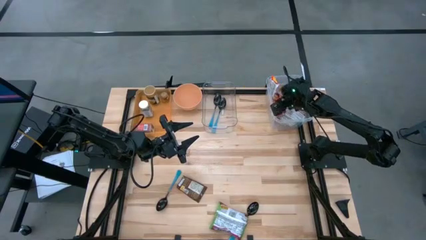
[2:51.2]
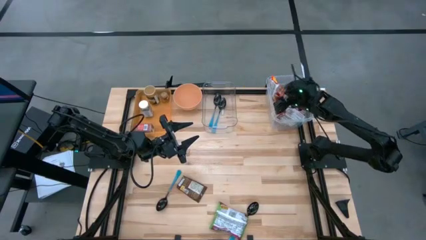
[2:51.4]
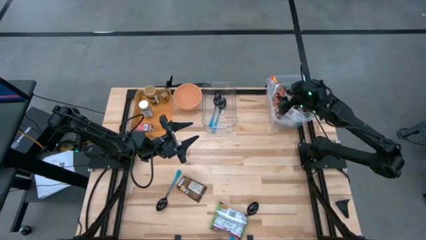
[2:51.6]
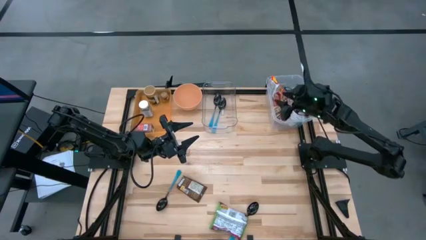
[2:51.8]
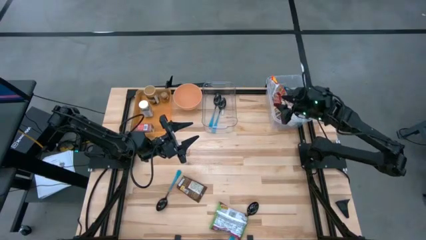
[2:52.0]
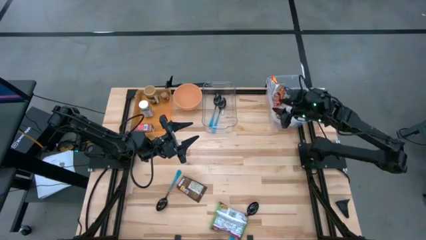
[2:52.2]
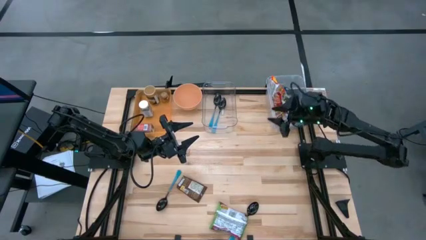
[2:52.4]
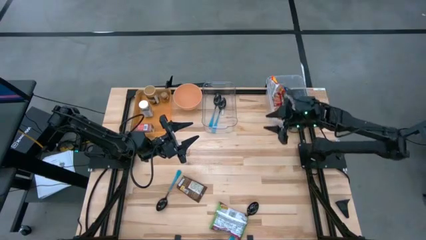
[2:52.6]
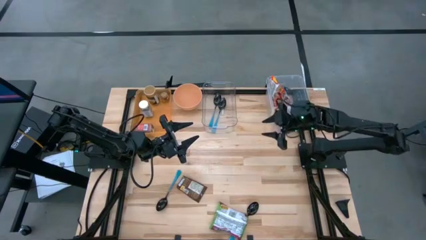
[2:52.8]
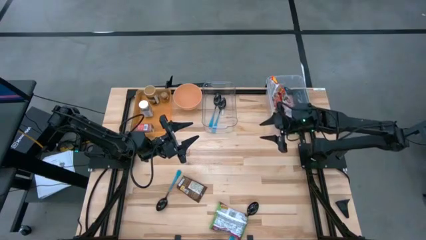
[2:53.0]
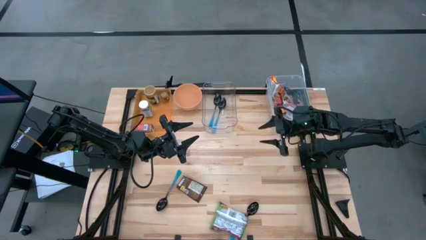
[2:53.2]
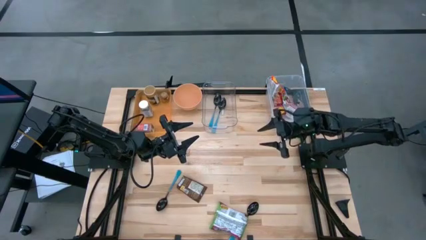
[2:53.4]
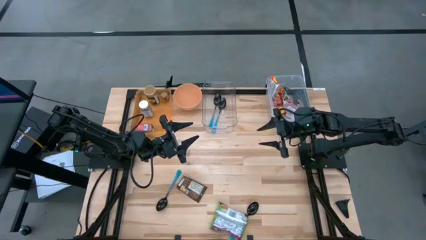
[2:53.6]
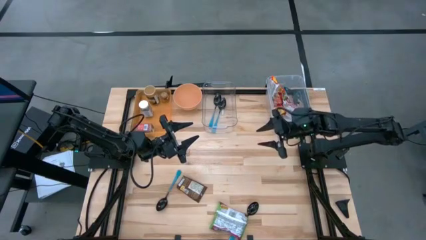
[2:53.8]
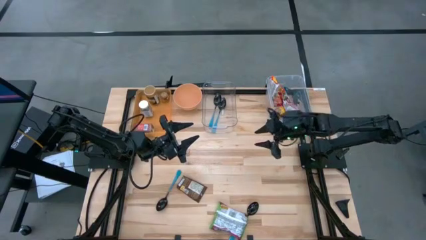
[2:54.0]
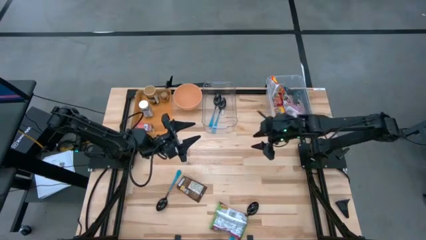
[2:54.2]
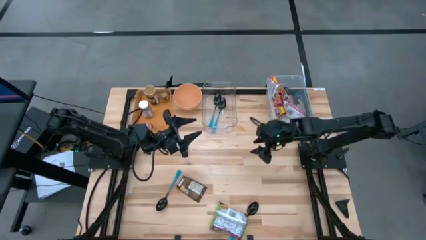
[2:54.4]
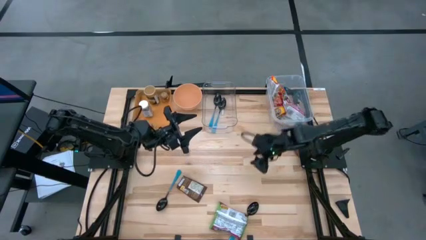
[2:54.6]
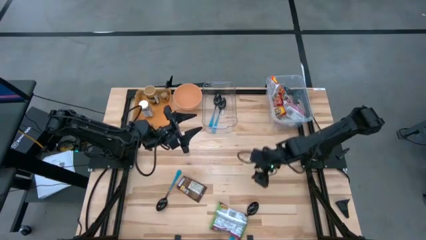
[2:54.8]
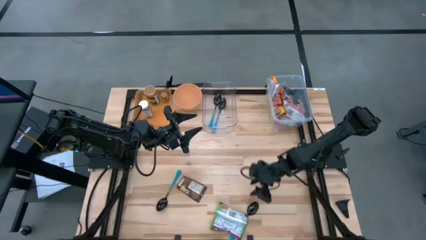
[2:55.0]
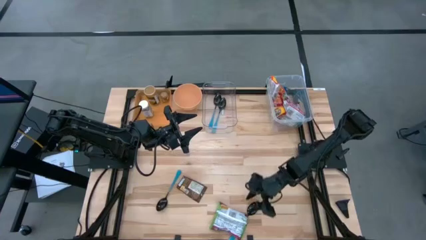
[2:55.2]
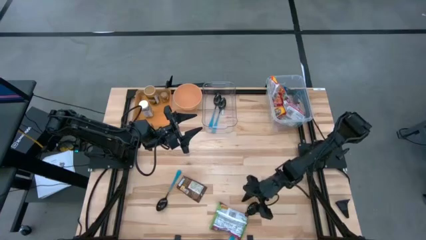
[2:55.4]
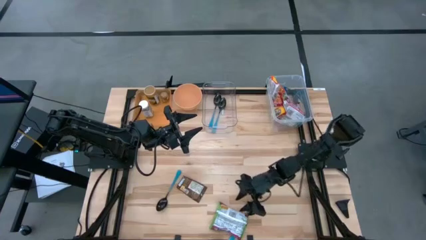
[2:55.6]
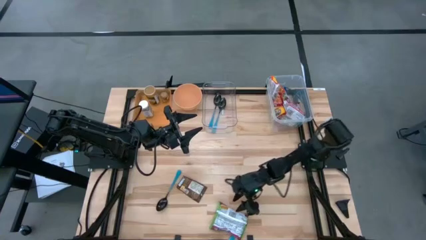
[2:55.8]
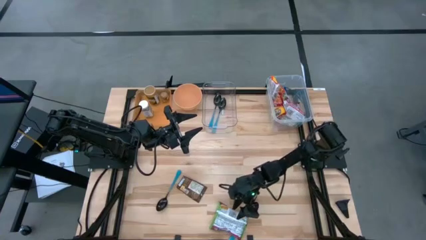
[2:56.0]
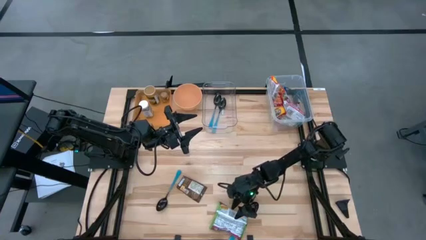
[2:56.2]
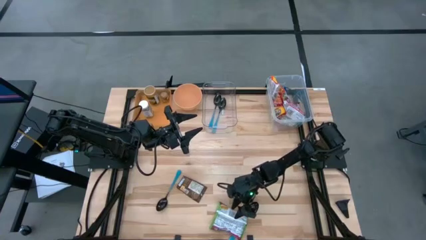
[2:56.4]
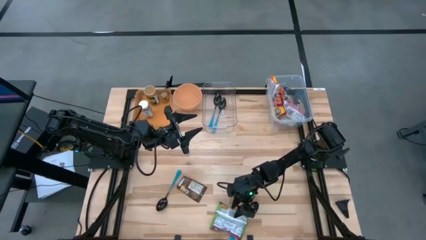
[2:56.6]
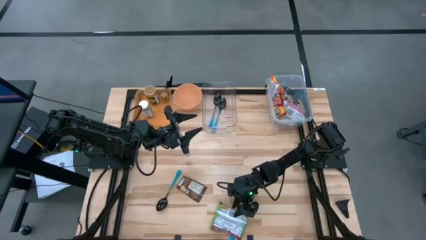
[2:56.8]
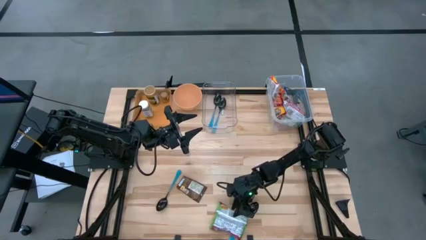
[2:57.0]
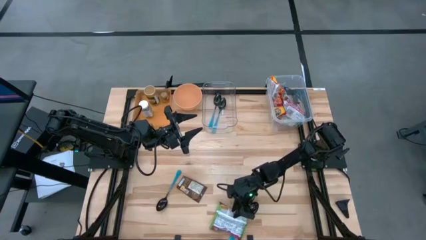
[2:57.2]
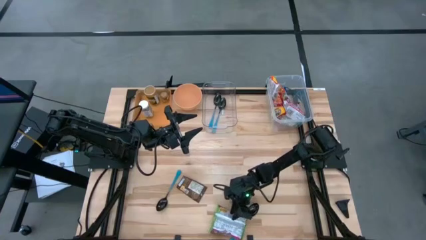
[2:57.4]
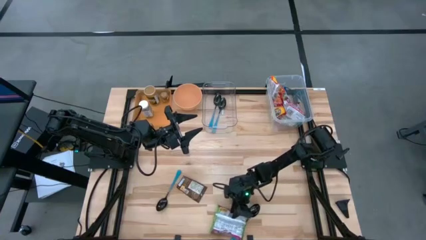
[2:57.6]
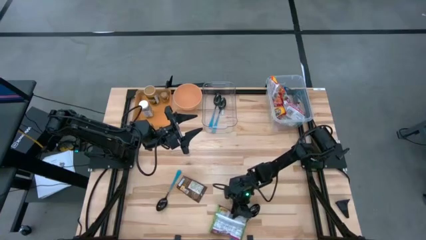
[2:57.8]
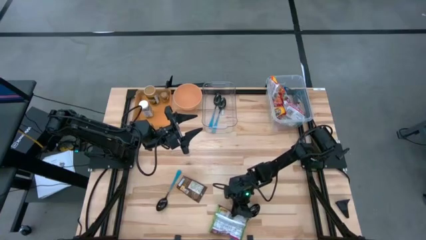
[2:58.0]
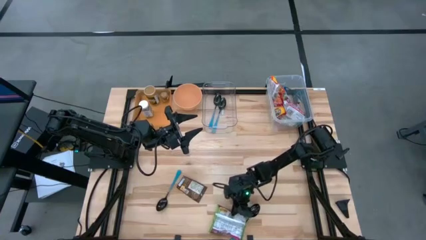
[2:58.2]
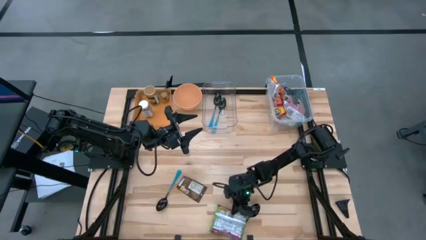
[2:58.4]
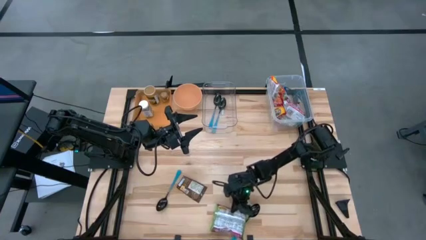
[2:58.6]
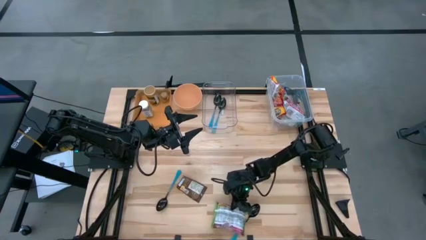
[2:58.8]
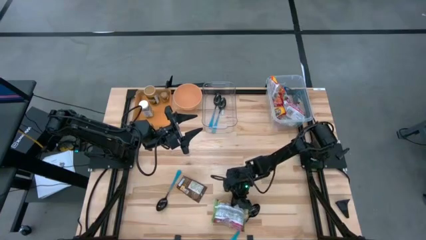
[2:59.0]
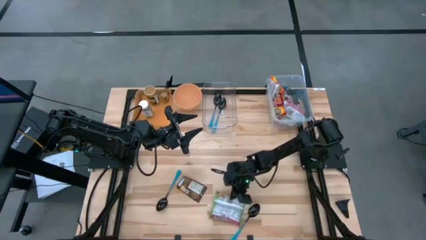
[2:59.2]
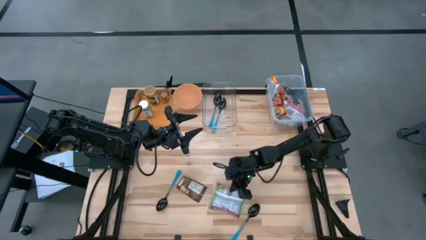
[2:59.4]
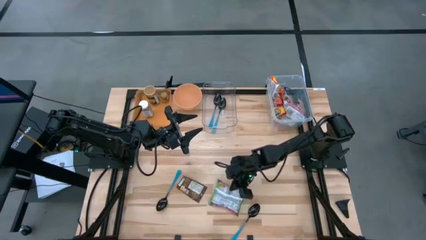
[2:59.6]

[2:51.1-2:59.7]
Task: Pick & Place Food Item
Put the green noodle pack into the transparent container

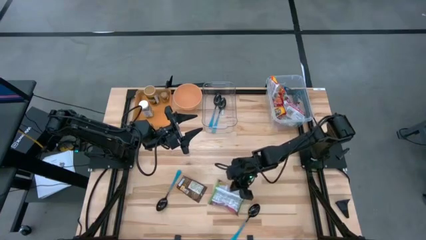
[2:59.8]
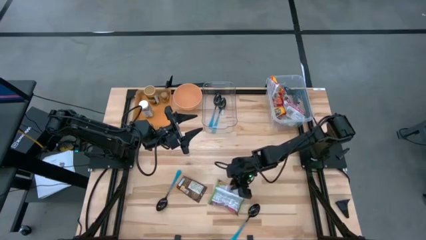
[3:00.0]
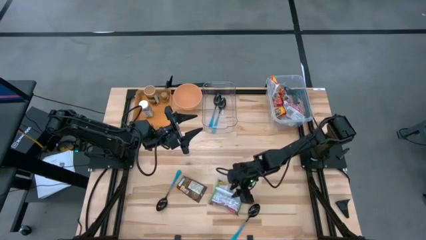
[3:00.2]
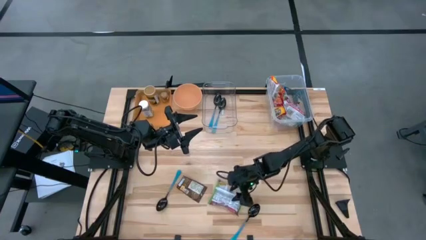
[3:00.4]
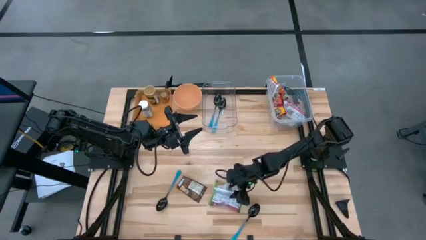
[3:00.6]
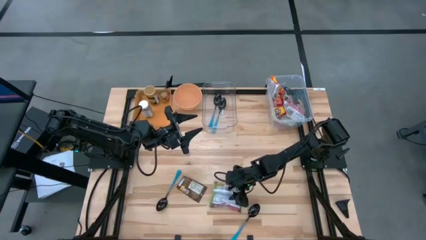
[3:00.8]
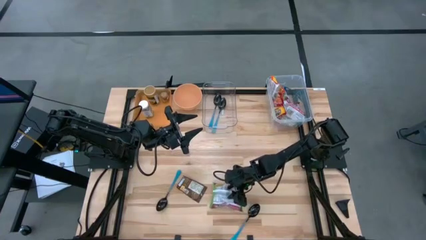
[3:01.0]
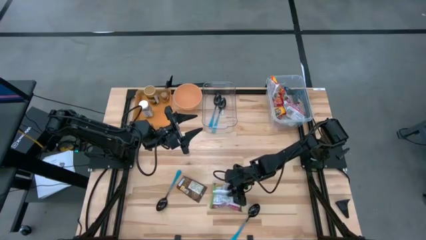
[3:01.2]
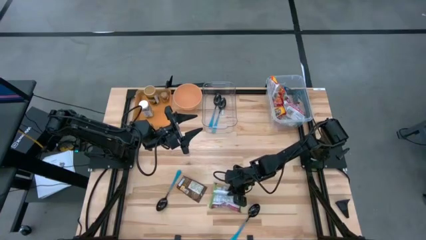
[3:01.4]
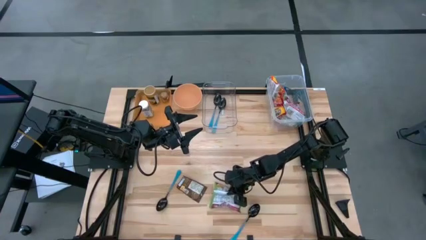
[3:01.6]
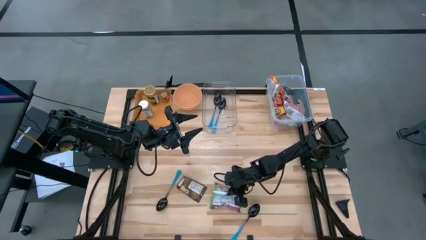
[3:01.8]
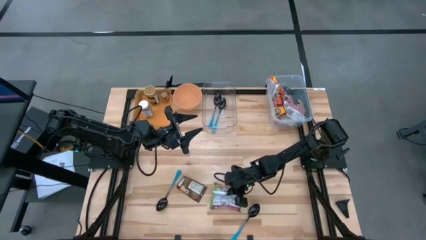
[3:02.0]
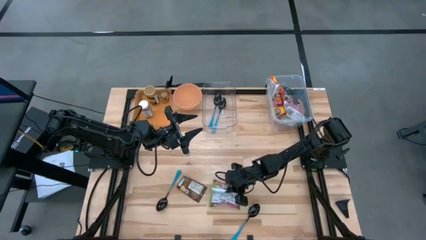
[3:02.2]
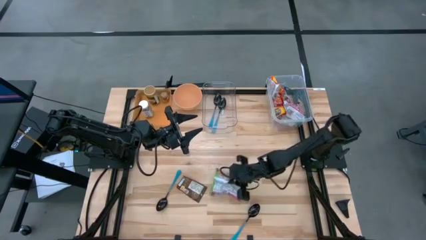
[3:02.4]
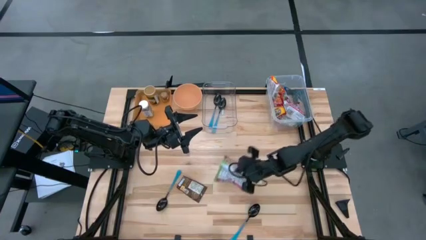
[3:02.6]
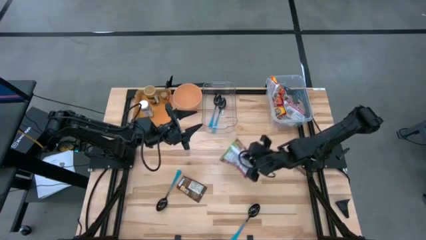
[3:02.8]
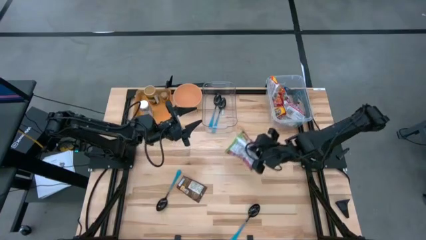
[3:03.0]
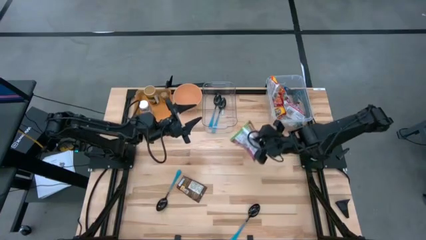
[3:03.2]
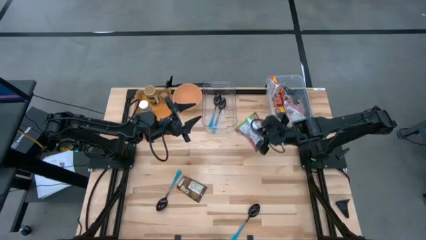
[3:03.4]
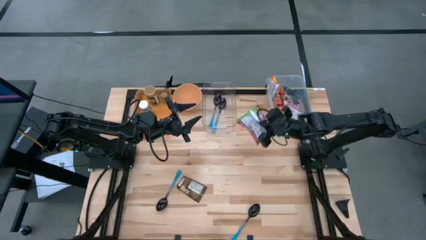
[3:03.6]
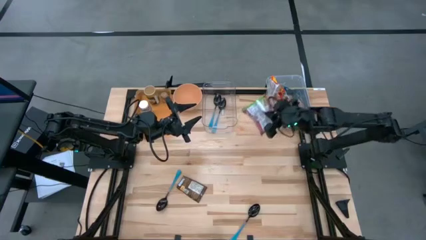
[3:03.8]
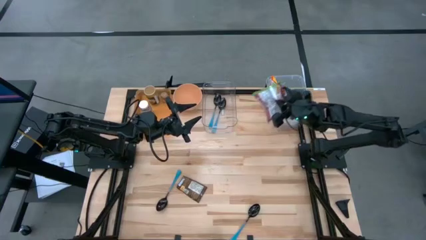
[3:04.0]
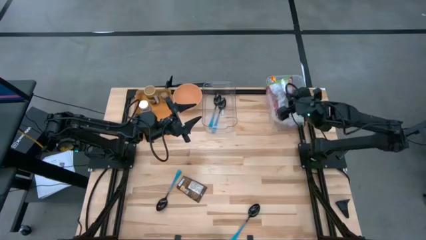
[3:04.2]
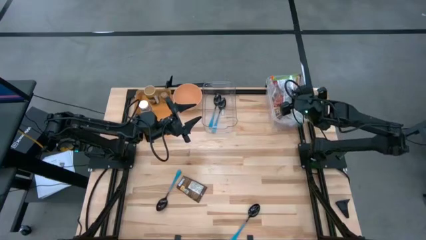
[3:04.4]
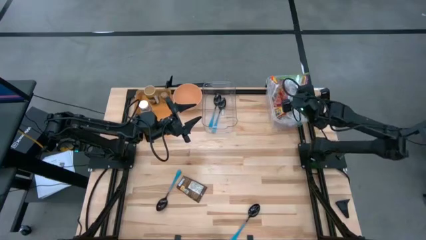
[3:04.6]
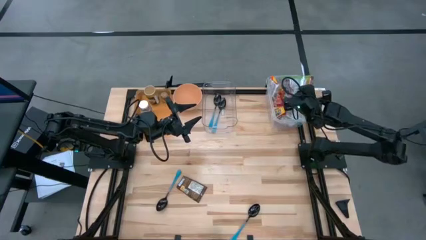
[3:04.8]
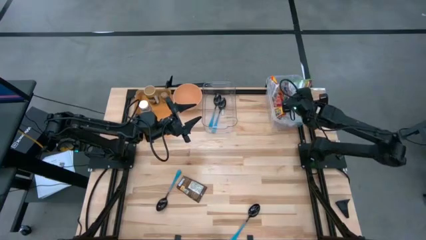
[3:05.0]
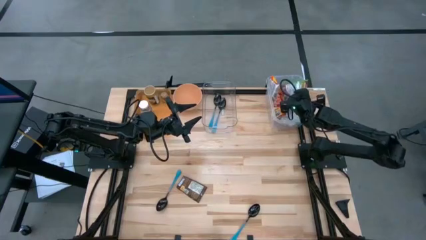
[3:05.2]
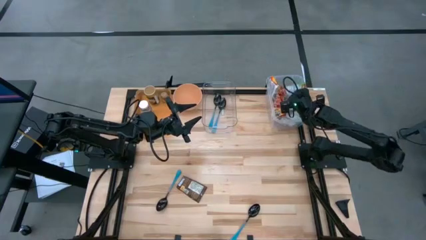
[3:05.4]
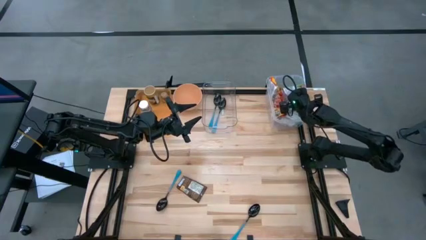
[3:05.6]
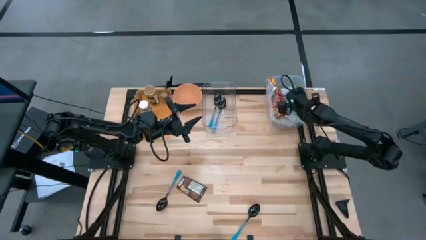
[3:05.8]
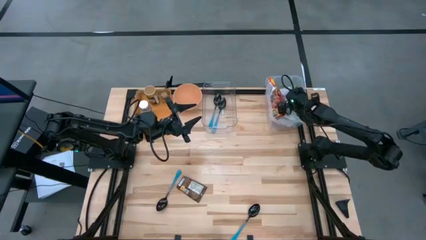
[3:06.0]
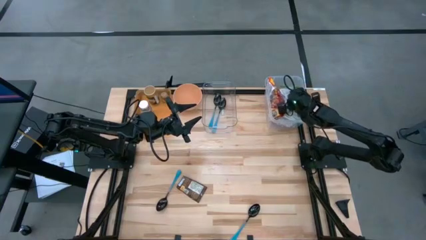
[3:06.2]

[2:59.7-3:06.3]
Put the green noodle pack into the transparent container
